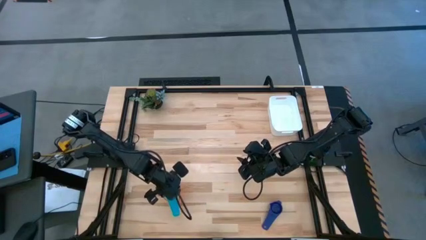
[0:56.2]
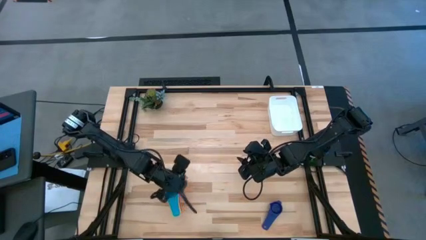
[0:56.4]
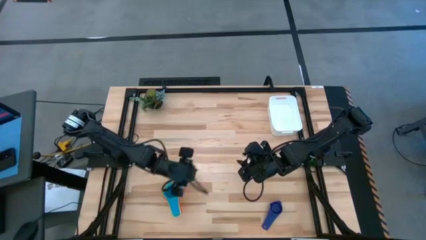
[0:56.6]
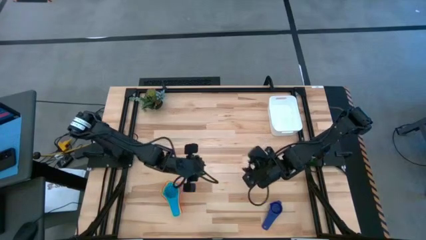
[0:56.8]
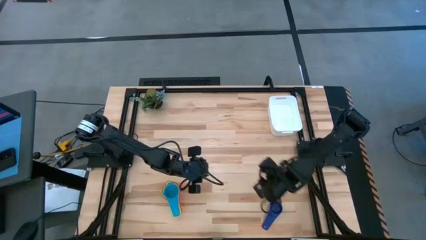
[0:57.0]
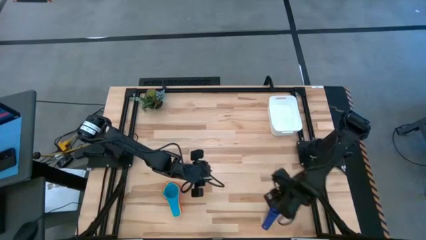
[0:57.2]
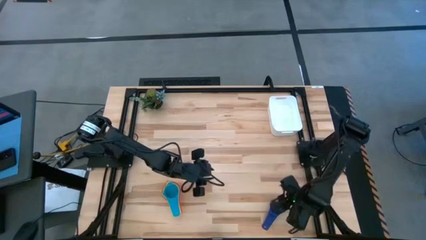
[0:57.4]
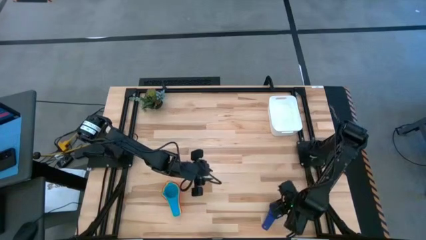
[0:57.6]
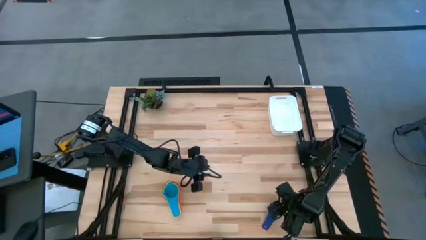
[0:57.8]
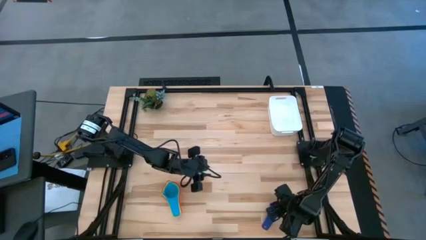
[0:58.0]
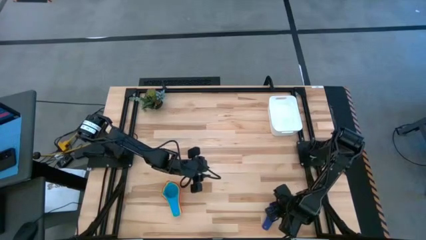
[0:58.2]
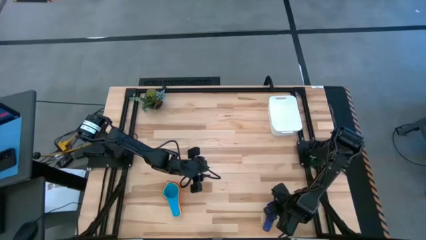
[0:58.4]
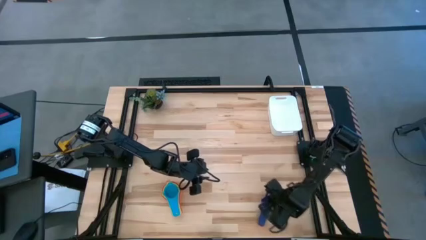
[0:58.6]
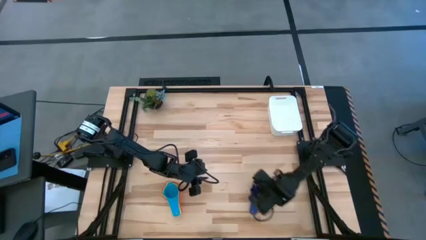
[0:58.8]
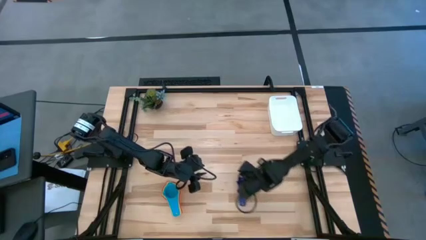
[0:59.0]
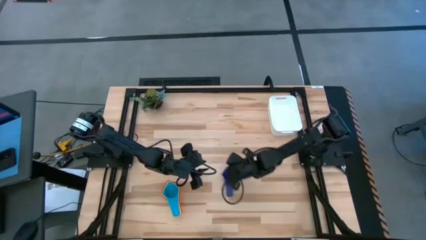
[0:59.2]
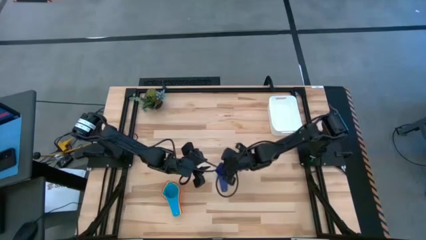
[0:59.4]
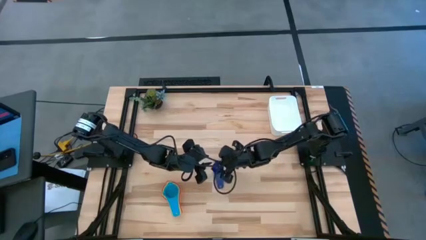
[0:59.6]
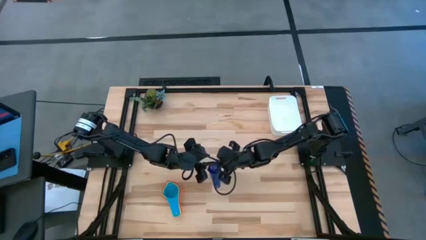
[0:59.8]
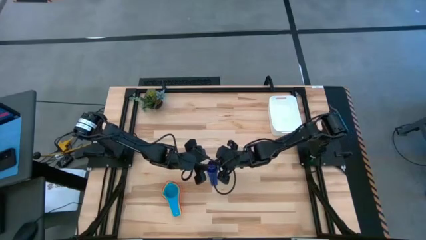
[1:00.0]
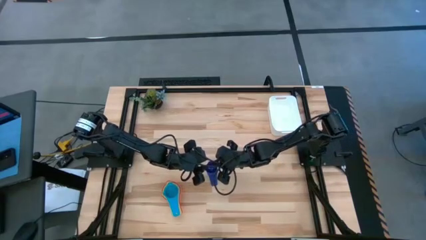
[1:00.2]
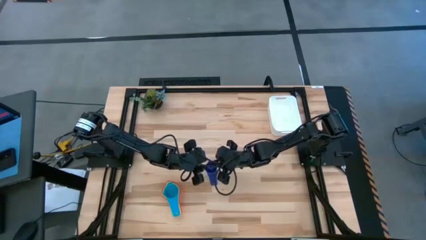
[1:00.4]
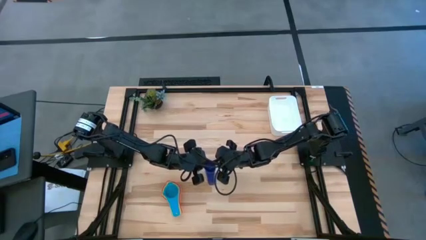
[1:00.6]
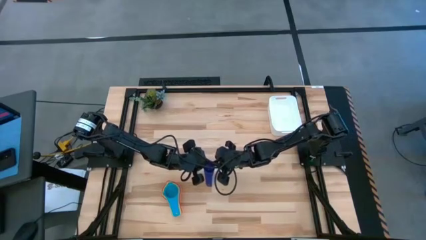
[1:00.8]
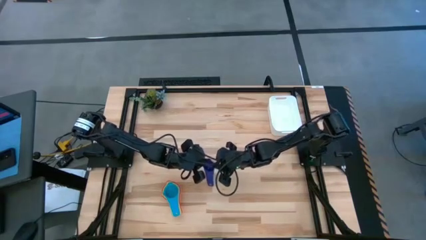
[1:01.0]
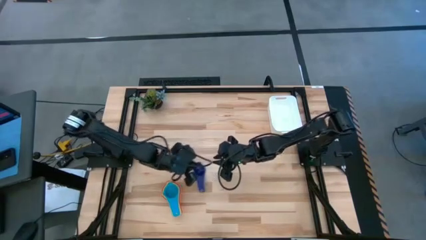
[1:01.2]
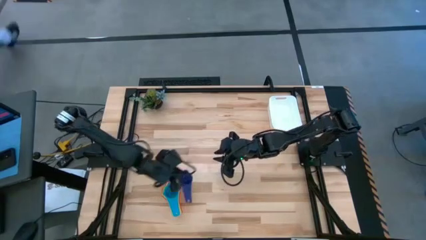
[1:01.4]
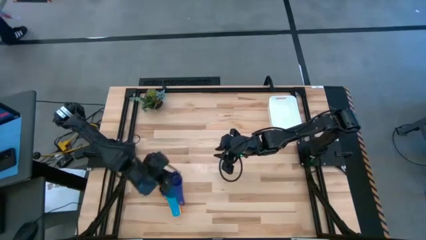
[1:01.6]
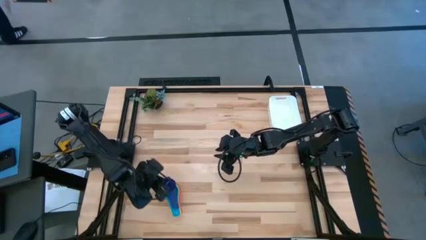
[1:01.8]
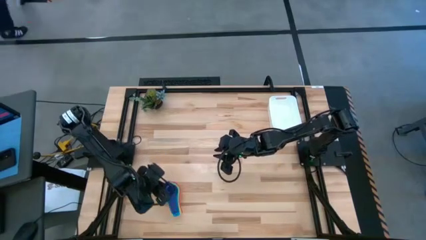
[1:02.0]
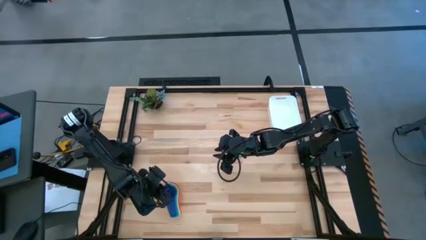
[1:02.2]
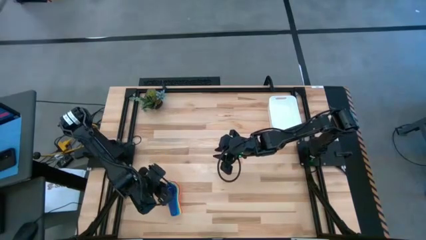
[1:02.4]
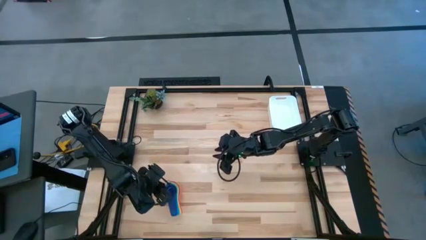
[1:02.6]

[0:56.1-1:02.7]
Task: Nest measuring cups in basket
Stack the violet measuring cup on top of the light blue measuring cup

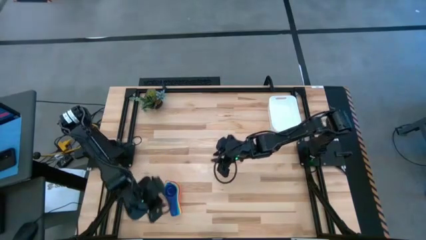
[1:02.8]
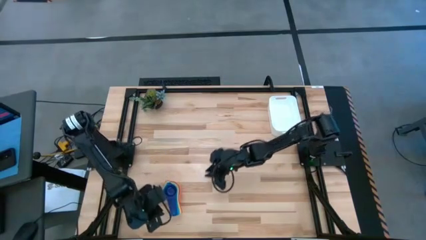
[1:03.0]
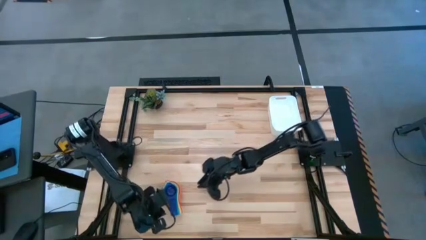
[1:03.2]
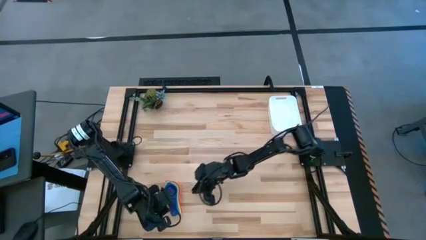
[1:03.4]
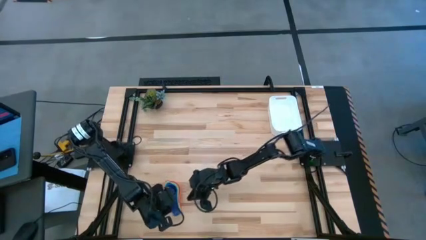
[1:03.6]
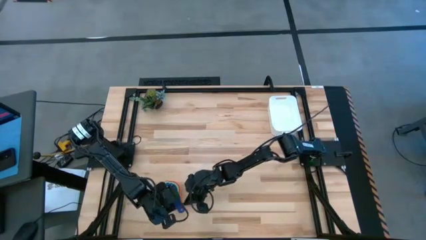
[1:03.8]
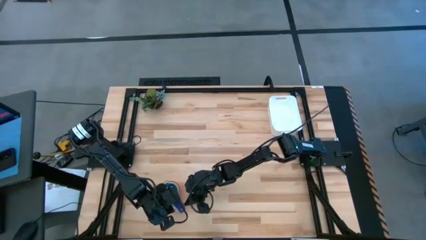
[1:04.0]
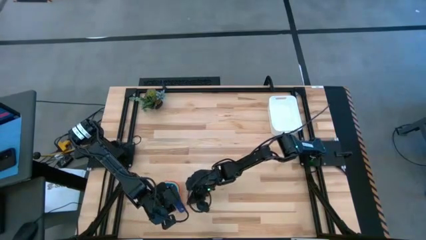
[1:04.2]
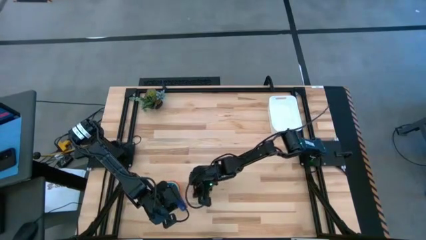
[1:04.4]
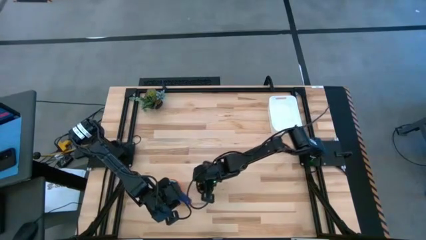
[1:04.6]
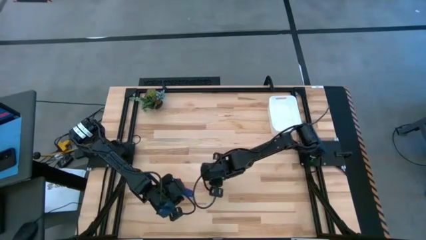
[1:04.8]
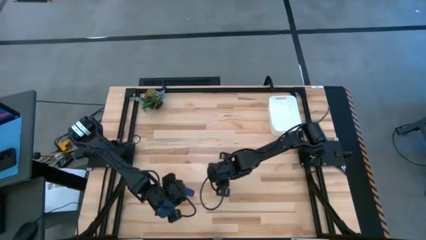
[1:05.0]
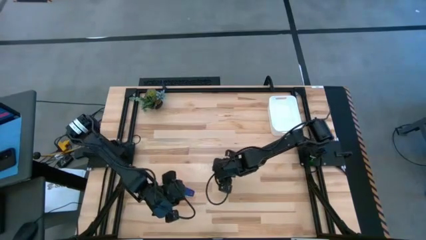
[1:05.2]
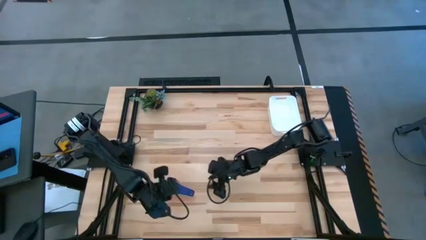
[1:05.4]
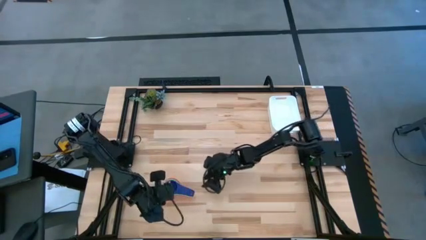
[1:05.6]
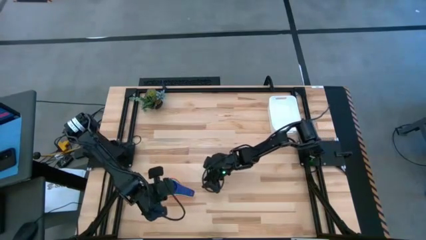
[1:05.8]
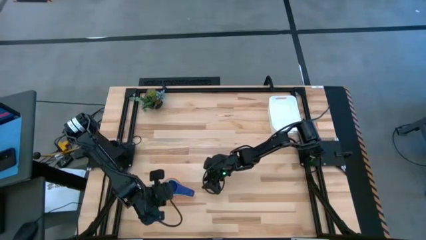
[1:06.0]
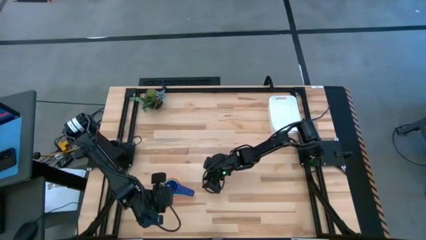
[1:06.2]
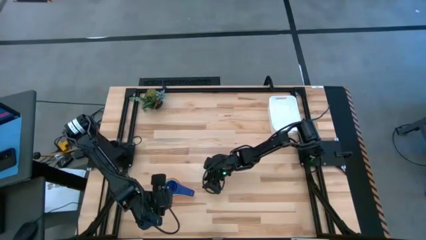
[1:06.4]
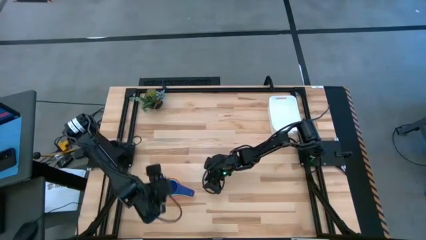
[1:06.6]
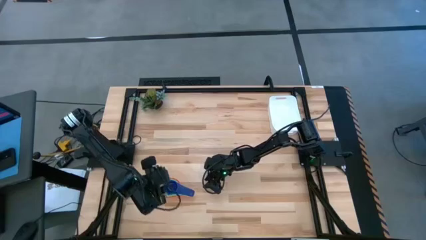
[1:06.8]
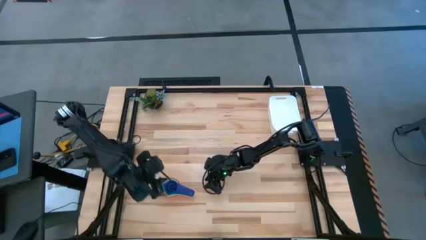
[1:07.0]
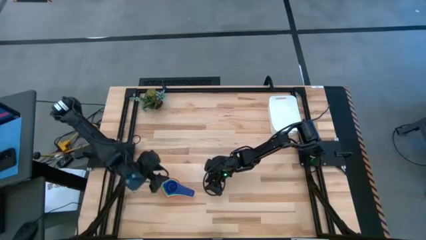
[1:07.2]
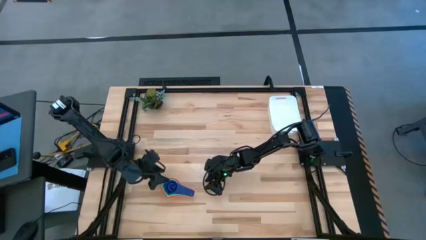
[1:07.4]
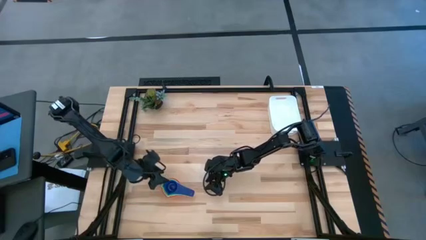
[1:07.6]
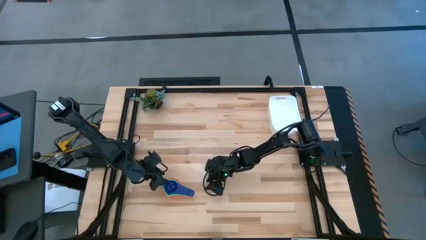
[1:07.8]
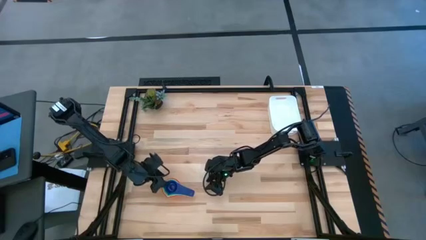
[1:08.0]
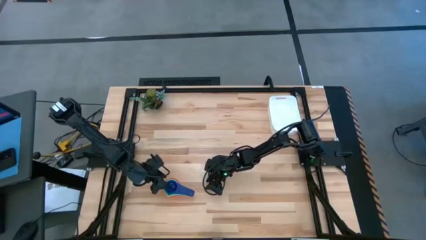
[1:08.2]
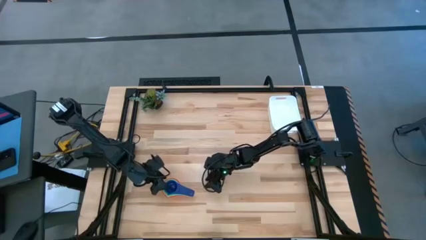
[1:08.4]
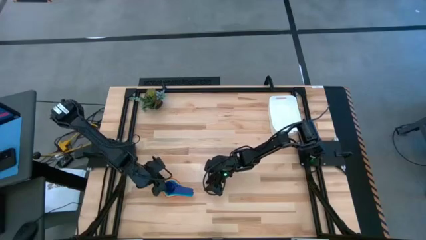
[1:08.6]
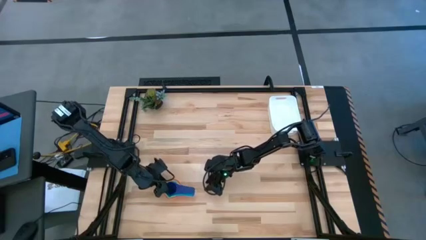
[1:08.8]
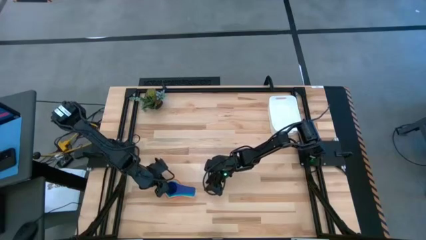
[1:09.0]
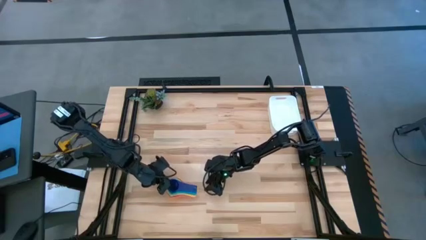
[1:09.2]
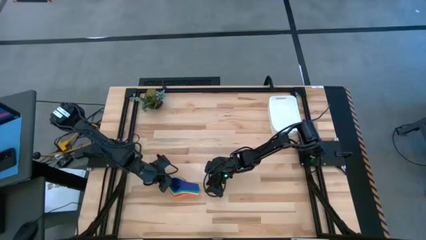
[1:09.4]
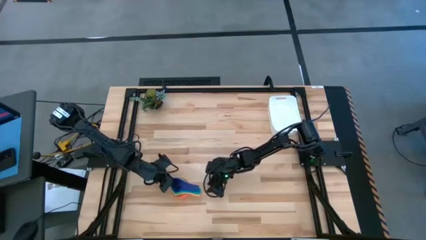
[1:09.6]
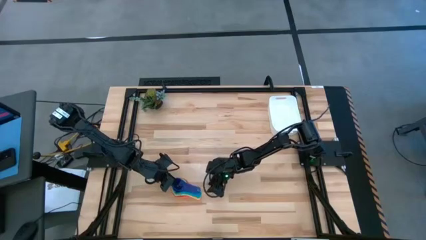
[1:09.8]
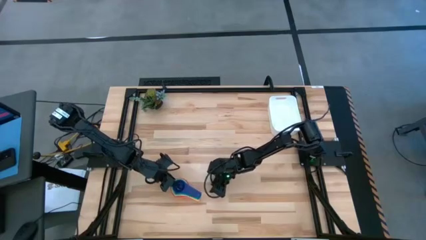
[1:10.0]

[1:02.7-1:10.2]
Put the nested measuring cups into the white bin
